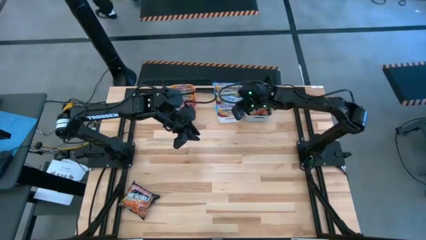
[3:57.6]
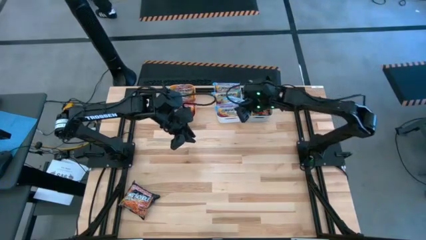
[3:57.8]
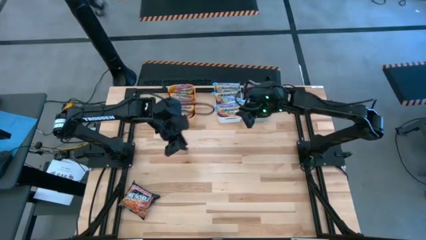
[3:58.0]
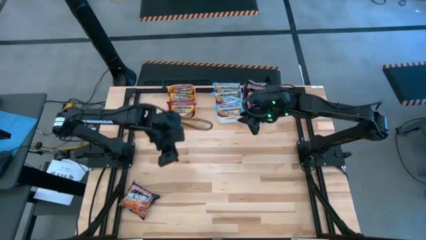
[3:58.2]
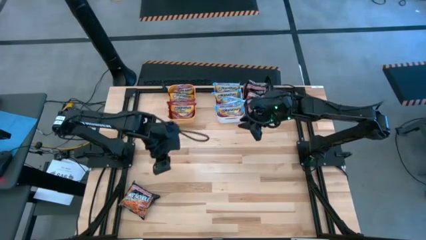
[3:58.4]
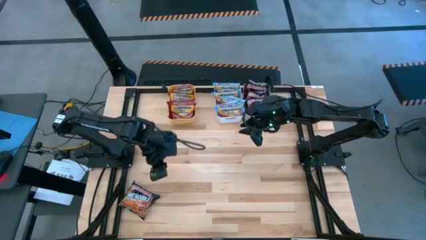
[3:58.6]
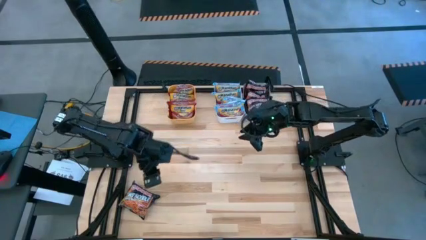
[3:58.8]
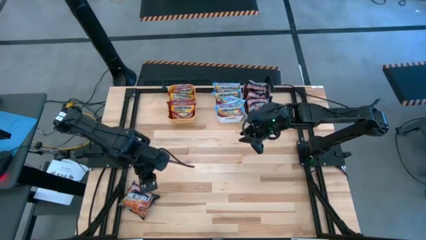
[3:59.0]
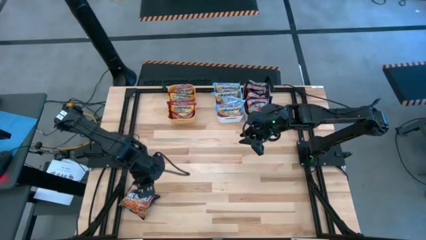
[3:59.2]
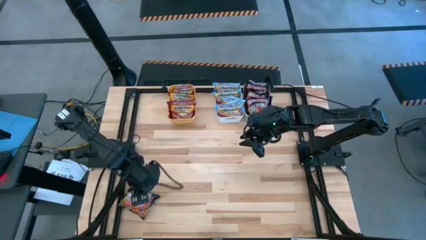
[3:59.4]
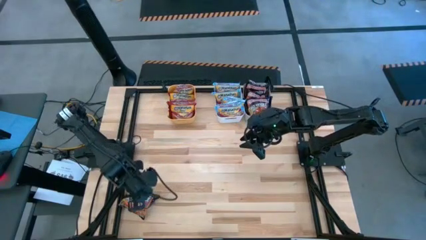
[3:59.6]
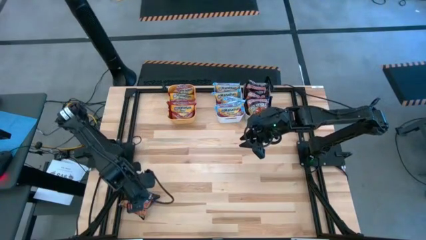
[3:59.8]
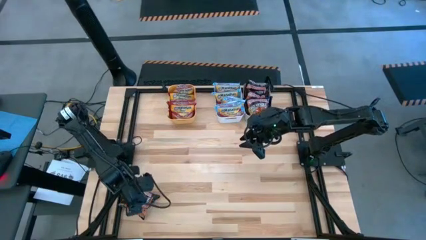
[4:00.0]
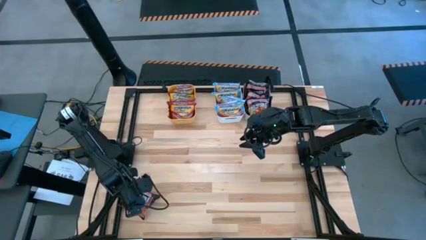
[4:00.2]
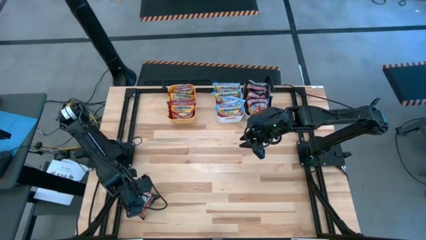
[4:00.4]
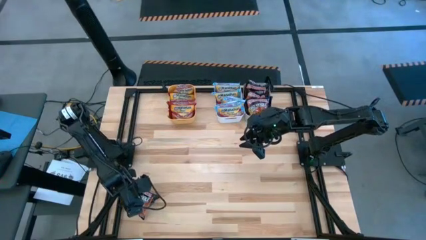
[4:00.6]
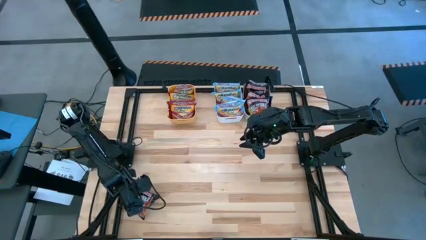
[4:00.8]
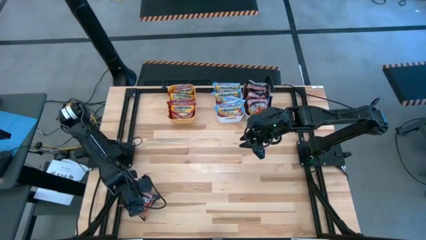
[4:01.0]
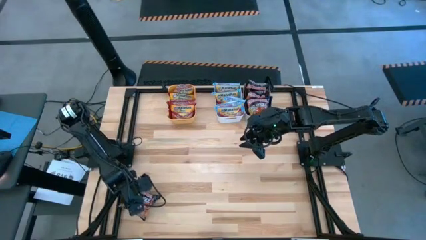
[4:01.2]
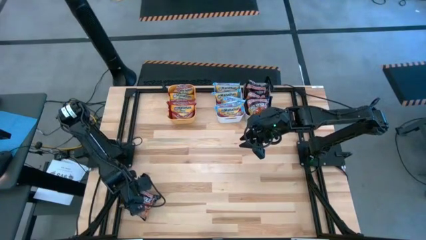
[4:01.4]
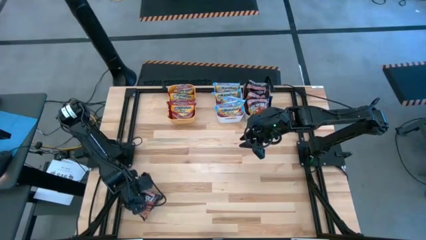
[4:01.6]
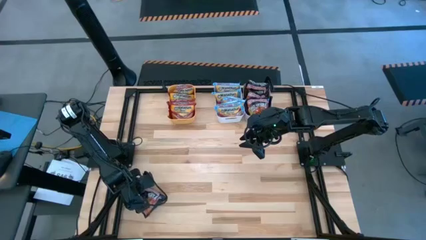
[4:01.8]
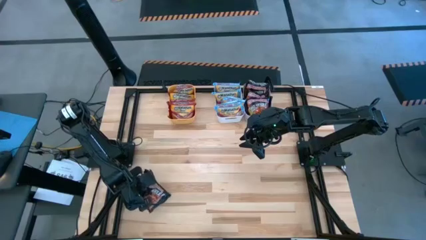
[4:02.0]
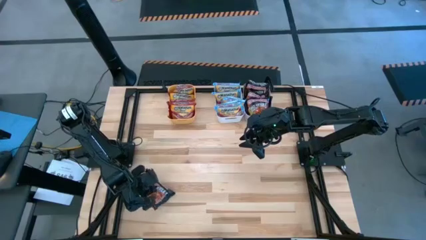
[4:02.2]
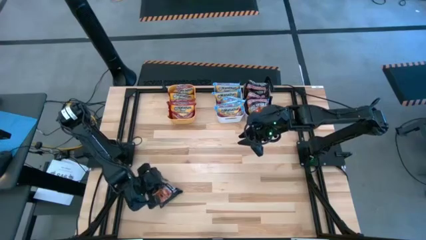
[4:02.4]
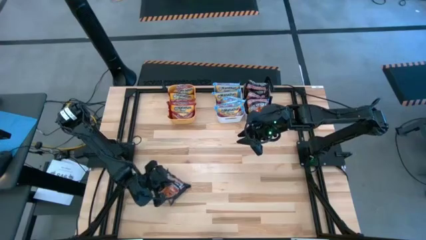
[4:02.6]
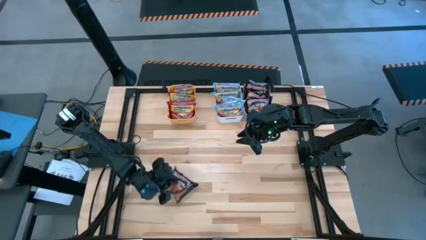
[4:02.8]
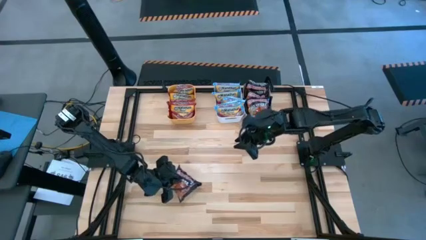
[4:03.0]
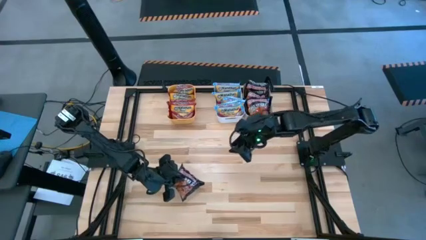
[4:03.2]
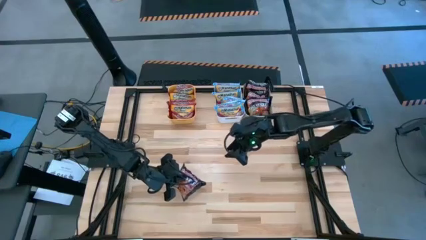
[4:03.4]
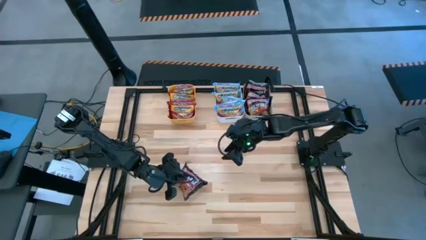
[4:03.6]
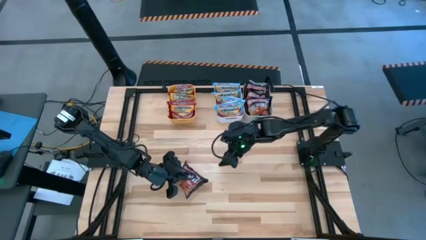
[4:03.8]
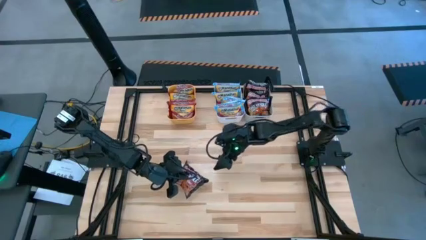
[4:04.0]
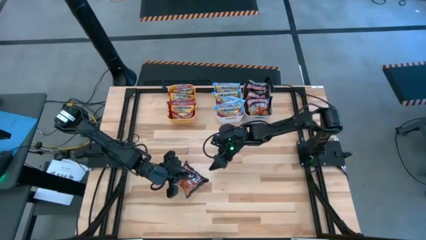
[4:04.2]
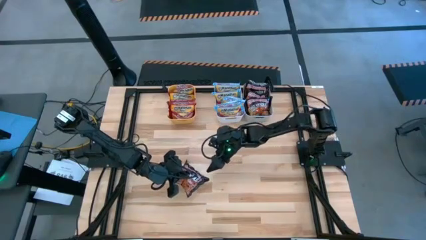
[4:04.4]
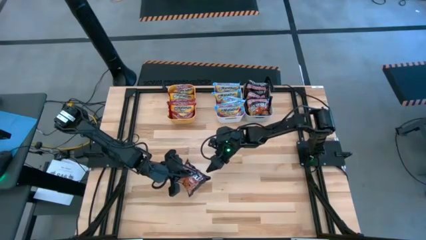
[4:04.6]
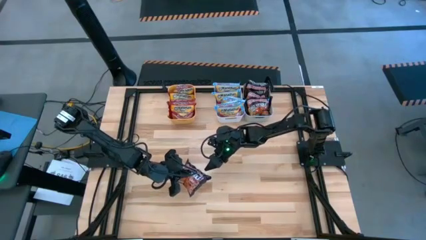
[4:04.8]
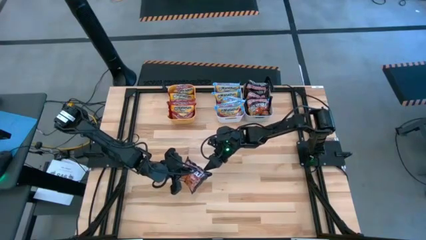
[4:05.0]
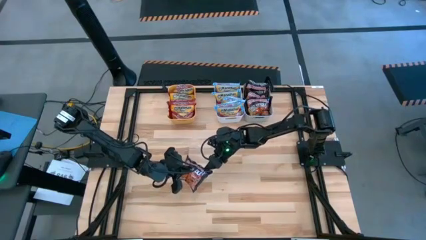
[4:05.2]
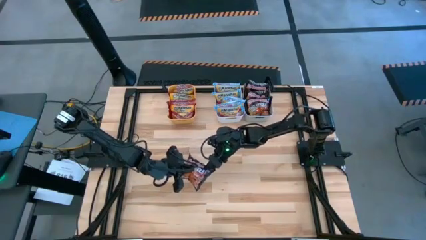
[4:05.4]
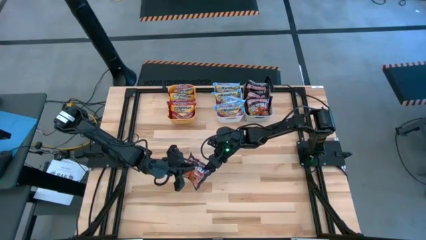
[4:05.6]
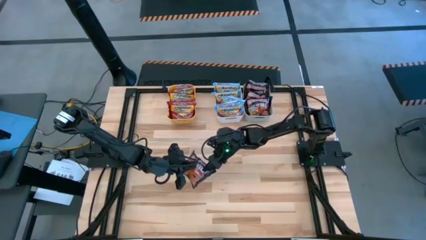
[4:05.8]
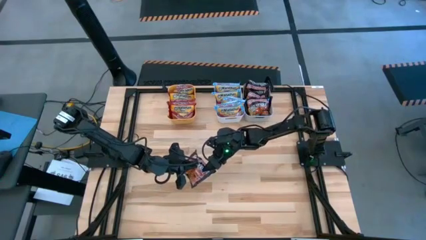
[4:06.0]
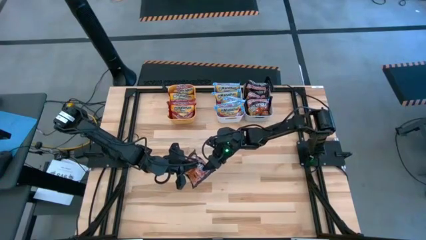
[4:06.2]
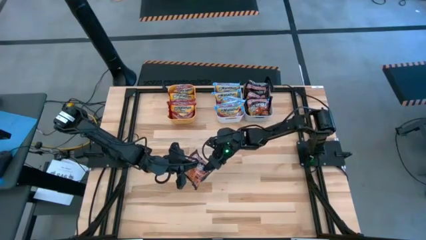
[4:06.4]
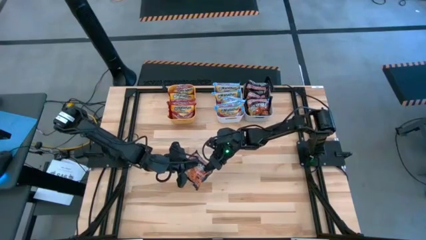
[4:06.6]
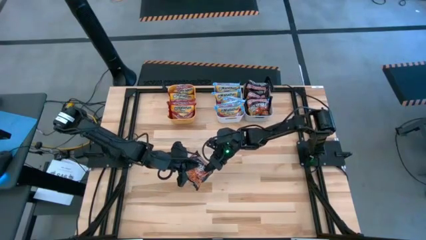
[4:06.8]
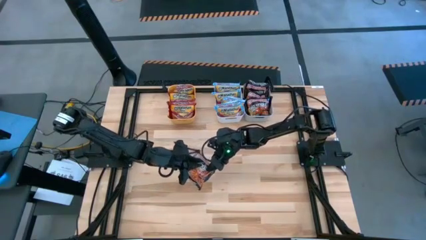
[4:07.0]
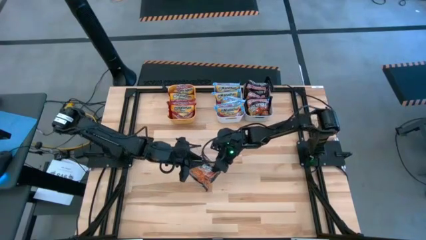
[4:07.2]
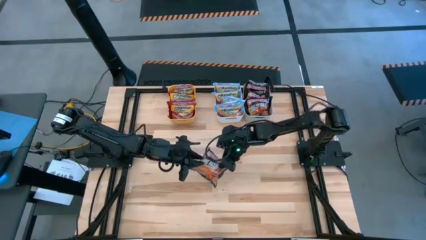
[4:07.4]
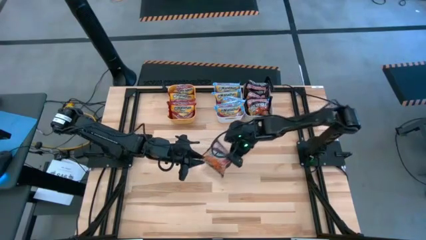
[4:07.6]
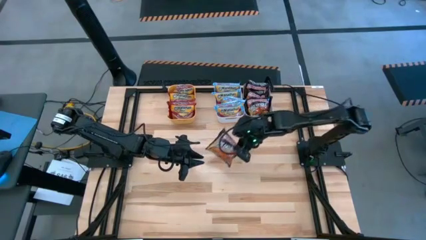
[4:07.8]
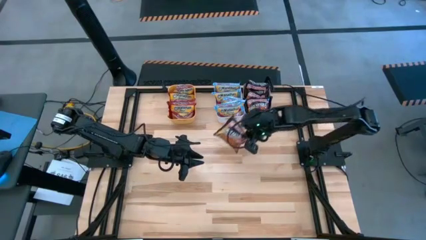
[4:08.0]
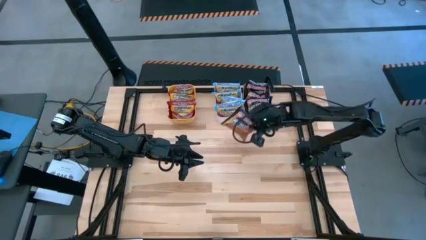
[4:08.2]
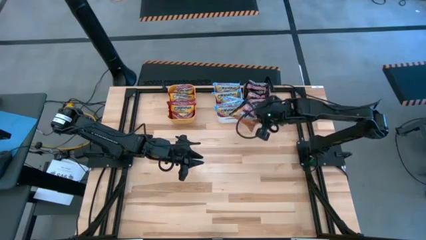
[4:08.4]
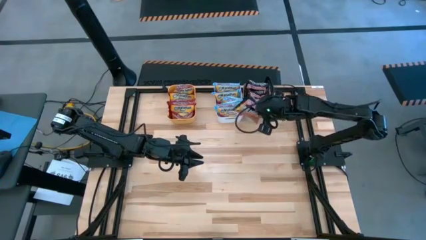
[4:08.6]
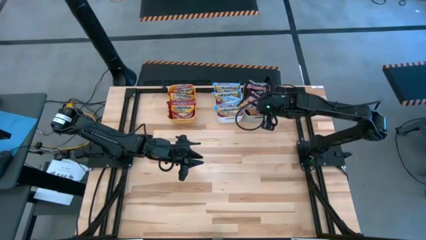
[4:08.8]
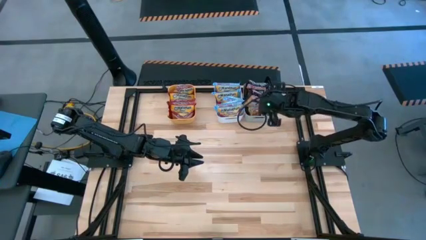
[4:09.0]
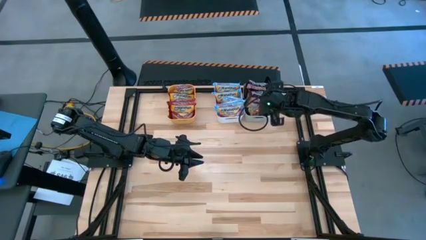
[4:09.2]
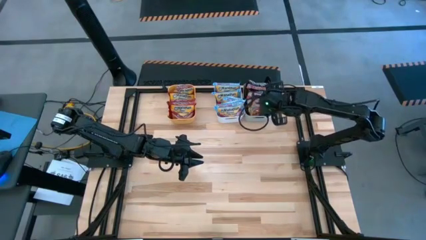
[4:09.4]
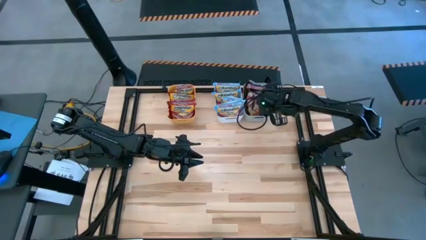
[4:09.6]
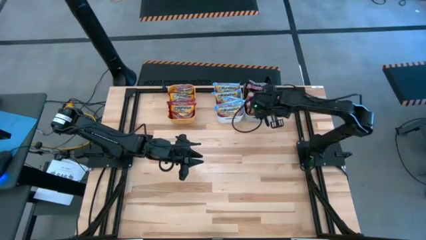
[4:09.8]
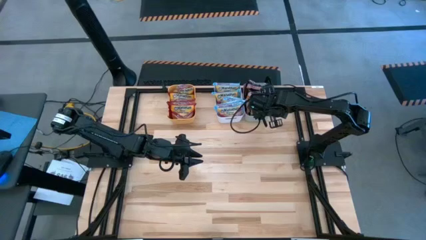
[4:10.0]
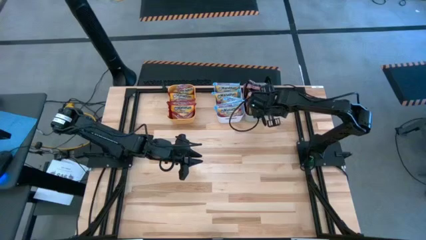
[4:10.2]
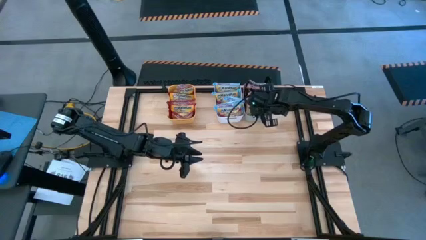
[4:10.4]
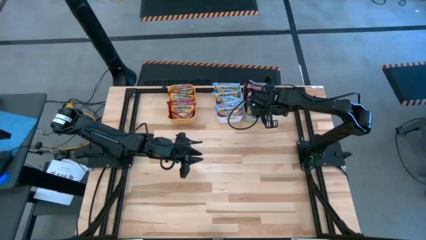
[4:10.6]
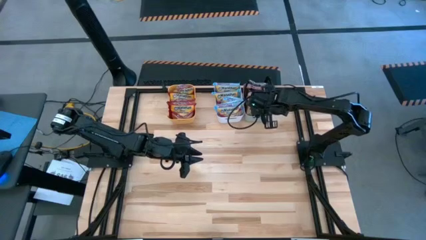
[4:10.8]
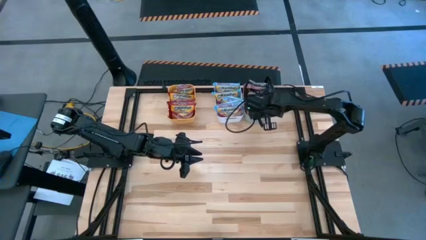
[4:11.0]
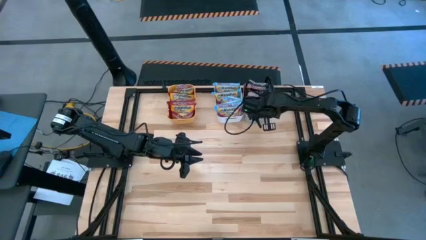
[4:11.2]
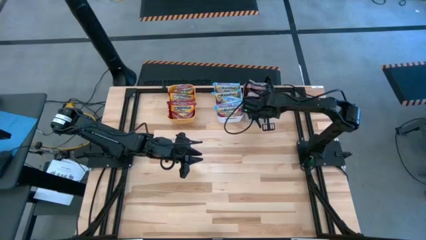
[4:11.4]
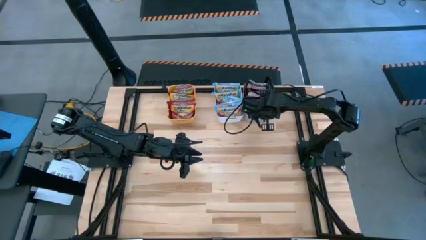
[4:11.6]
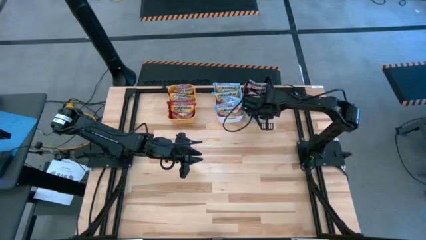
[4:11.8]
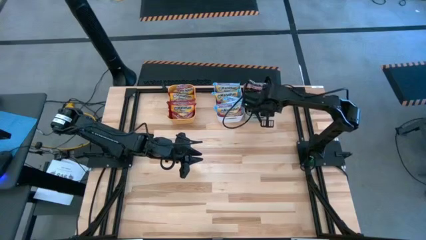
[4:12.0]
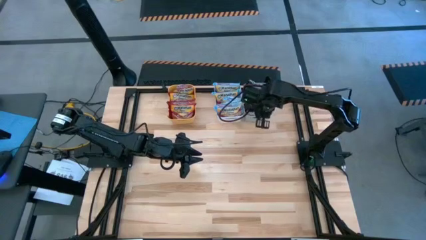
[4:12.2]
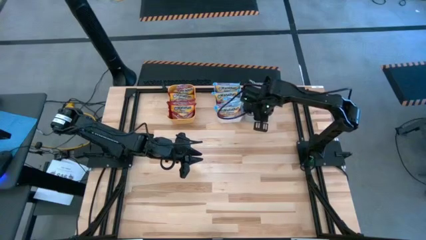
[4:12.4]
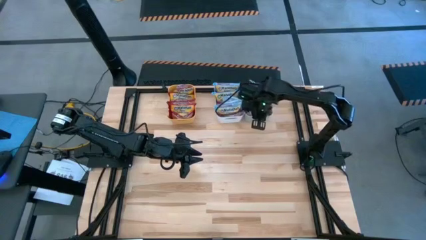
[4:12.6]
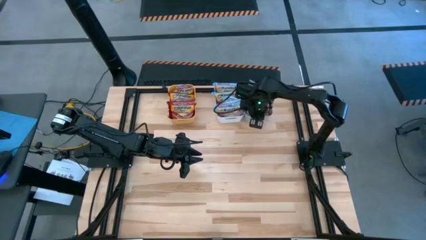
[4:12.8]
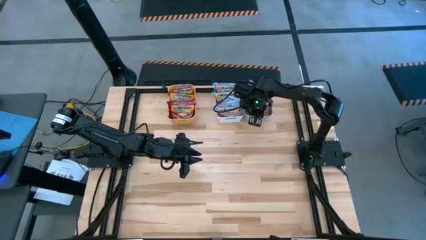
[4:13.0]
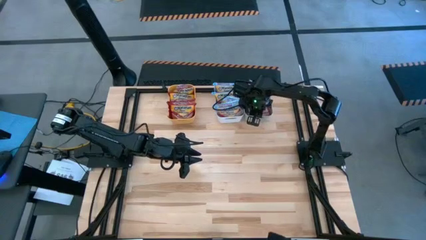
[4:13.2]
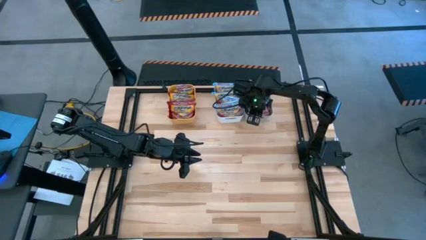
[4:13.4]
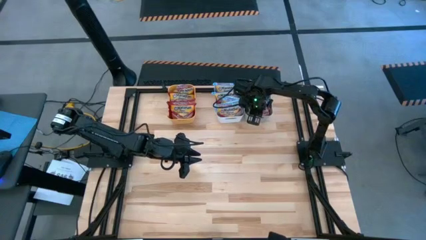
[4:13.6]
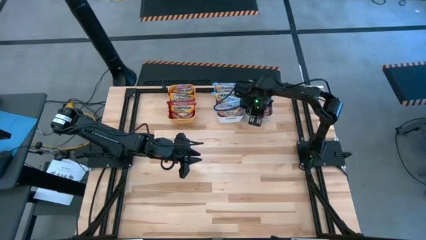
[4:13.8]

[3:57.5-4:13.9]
Task: Sort Maruchan noodles
Put the black noodle pack into the gray bin
